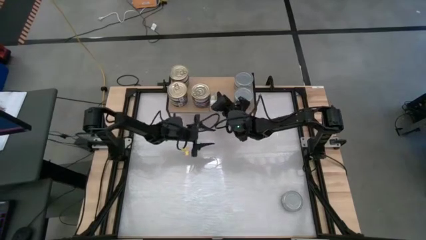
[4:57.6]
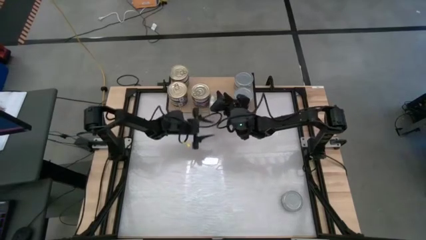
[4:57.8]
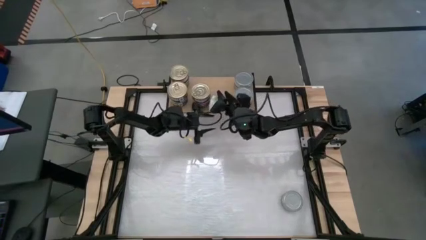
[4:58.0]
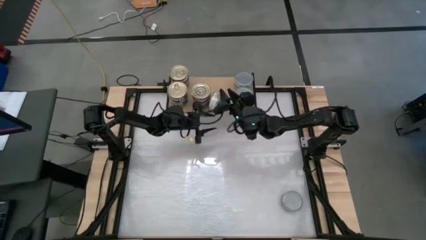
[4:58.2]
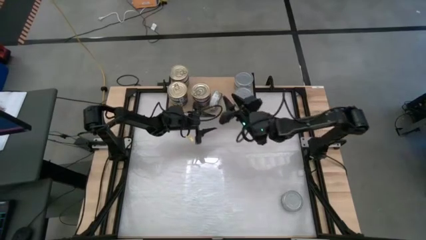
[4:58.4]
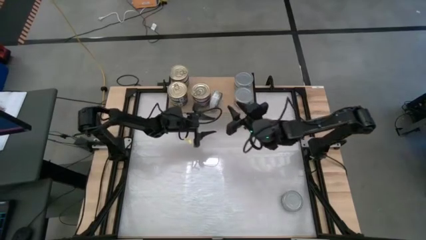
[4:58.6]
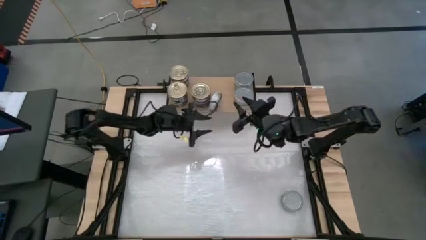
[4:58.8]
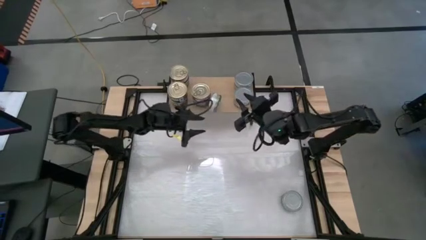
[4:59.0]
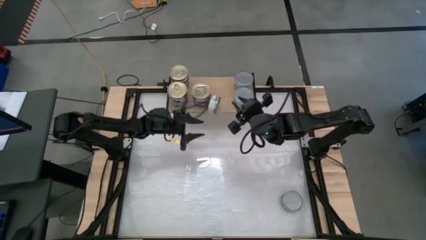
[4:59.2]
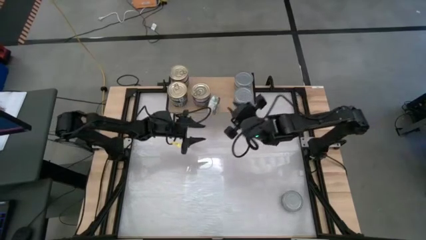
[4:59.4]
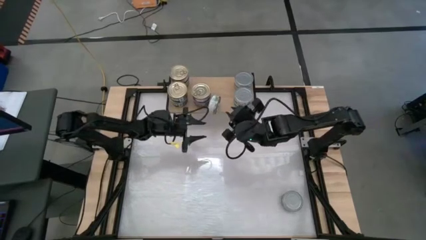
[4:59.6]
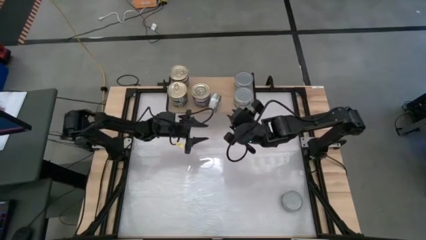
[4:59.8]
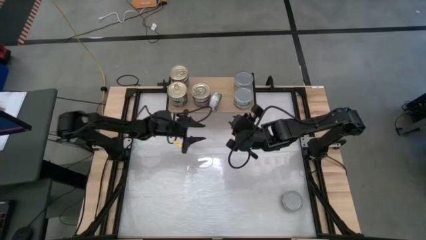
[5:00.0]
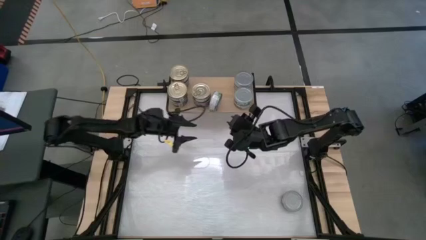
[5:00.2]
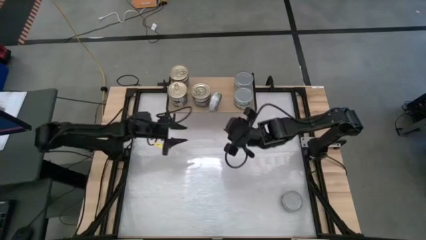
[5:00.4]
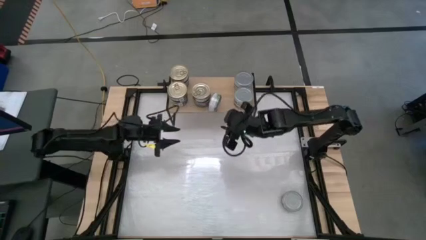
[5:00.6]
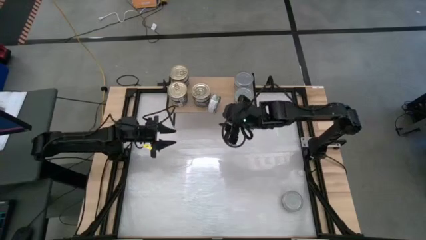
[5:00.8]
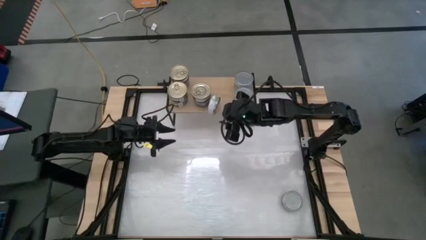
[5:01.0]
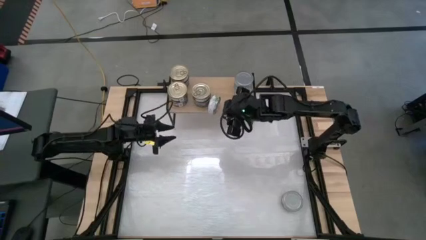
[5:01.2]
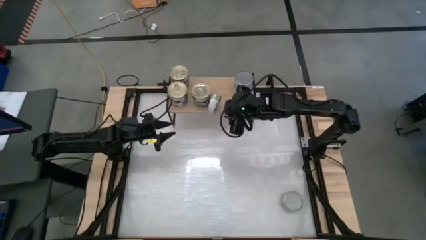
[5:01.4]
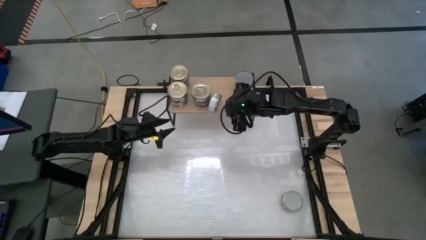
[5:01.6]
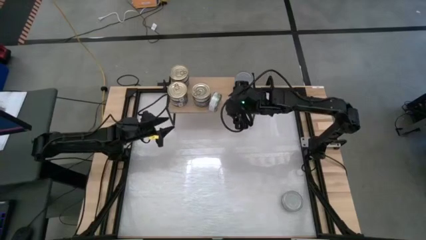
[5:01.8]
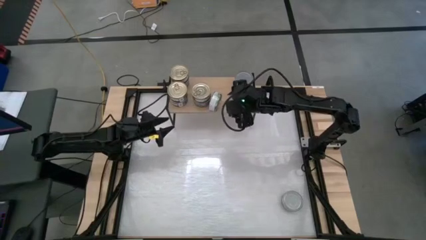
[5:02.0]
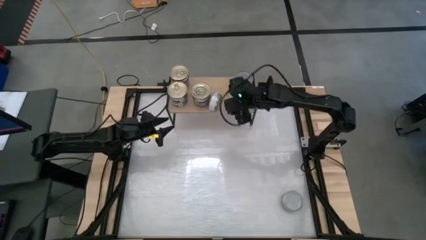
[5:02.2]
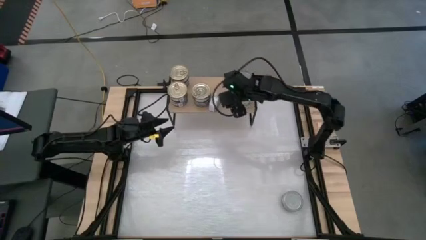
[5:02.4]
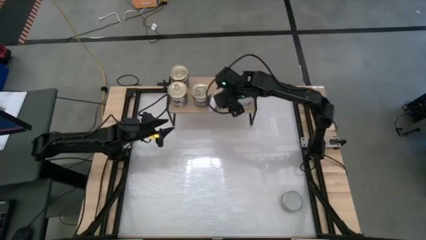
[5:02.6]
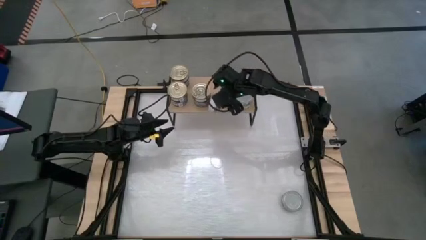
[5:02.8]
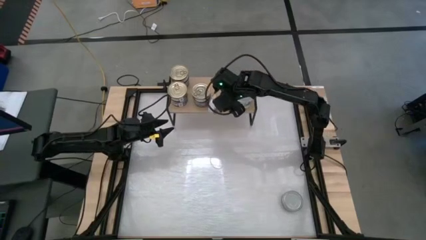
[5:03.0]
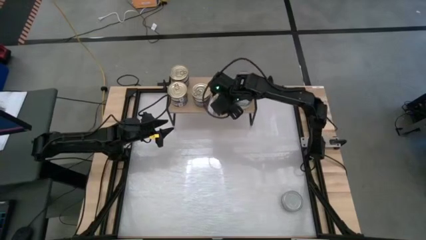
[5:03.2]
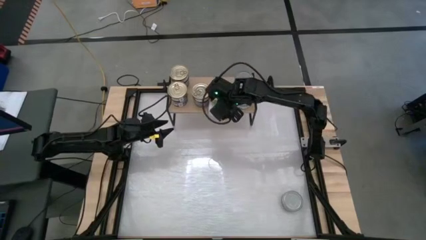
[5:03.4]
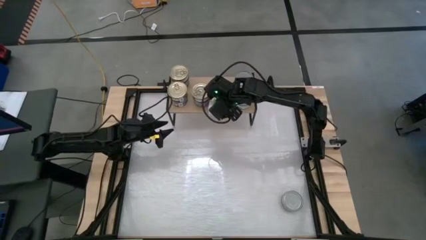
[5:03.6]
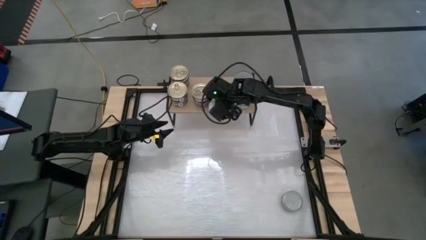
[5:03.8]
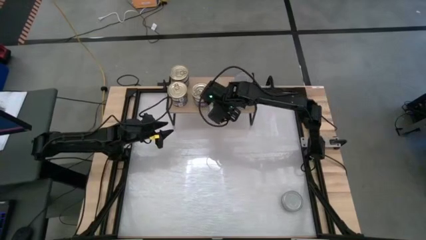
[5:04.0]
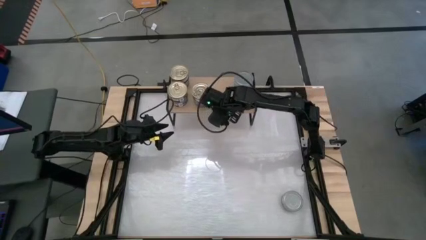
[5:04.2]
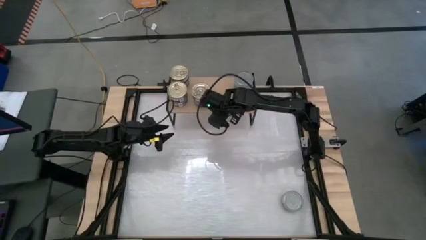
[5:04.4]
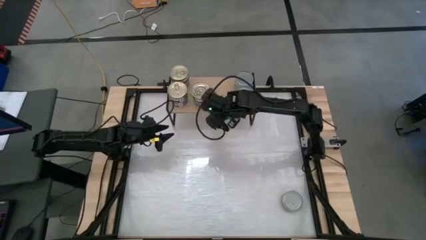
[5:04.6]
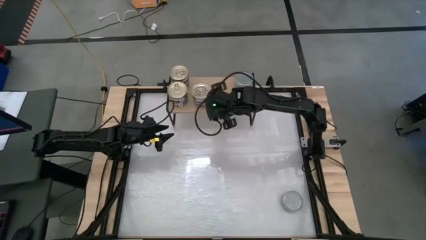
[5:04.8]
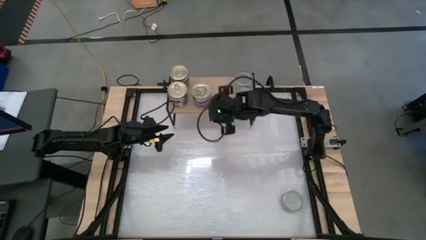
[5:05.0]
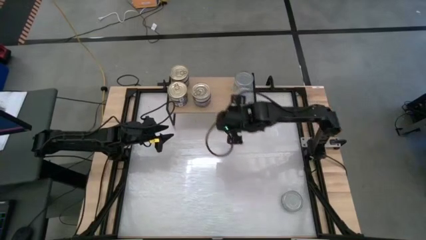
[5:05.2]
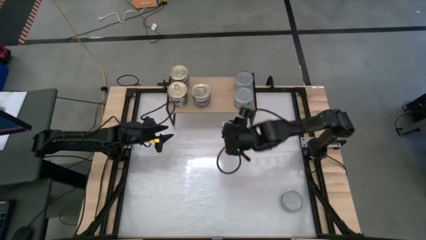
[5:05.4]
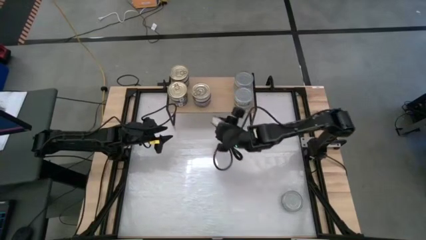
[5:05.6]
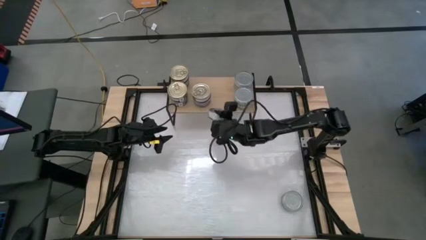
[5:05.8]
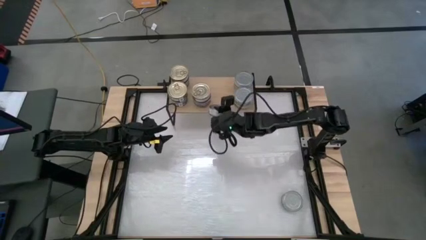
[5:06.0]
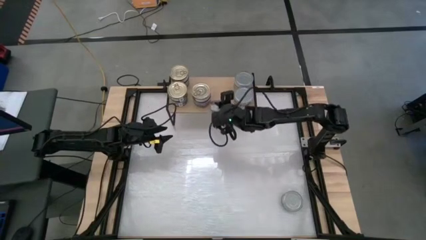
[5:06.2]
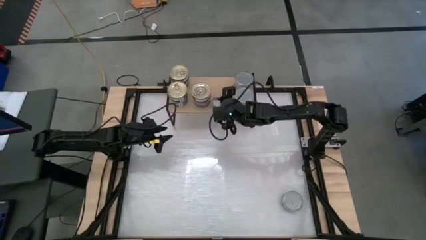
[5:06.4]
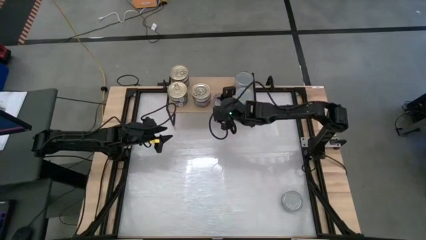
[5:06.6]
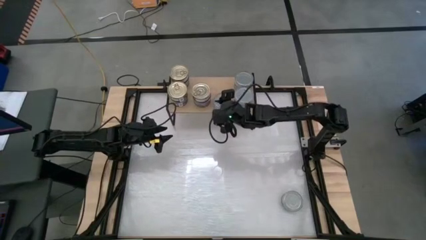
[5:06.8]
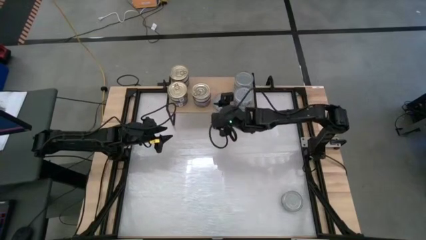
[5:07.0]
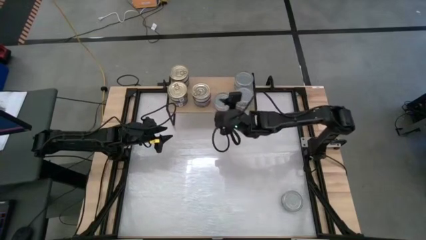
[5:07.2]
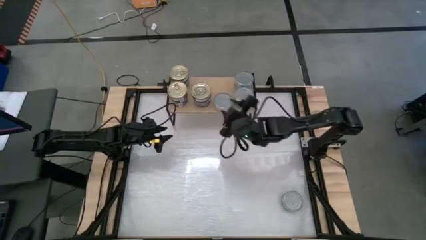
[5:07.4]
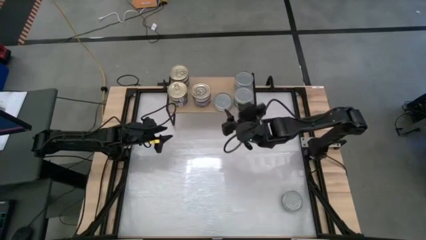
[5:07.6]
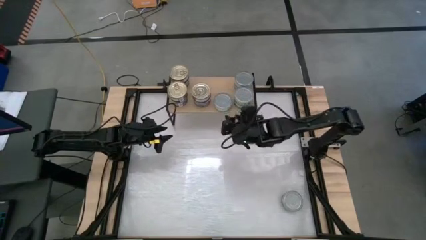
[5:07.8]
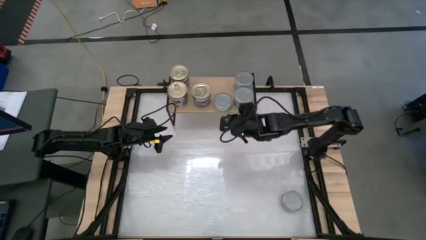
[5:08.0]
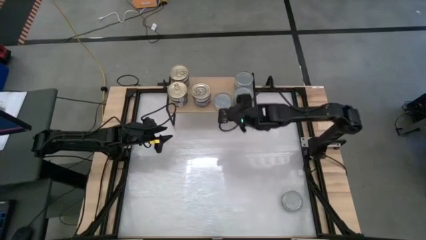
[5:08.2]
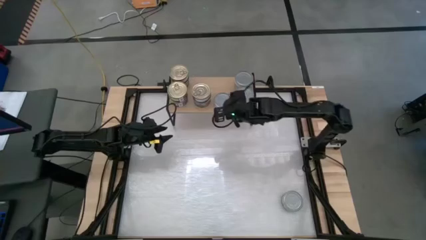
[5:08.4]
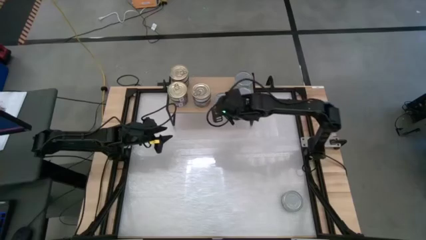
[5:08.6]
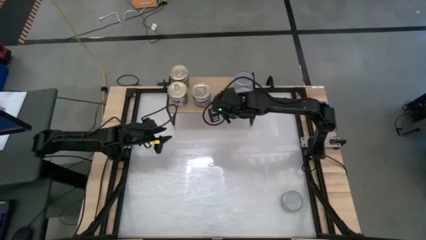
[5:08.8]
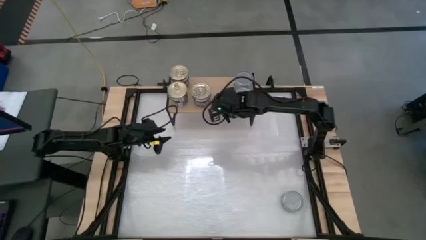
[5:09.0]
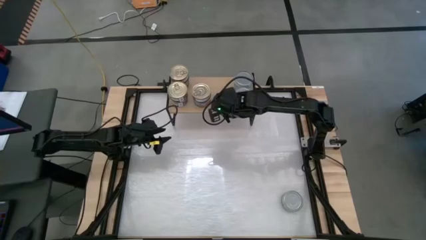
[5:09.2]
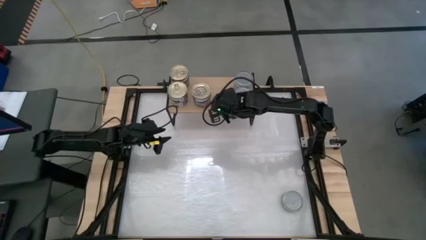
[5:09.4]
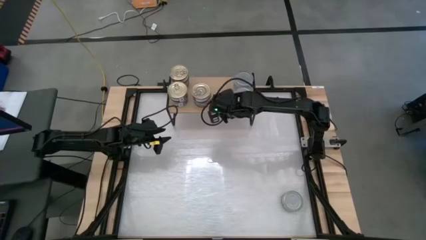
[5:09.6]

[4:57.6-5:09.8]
Task: Stack canned seafood by type on shelf
Put the green white tuna can on the shelf

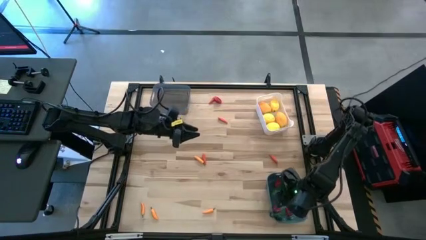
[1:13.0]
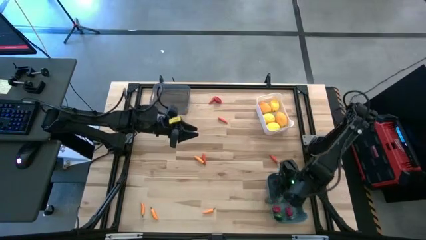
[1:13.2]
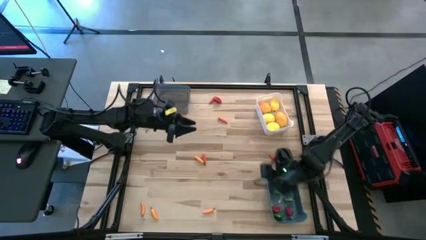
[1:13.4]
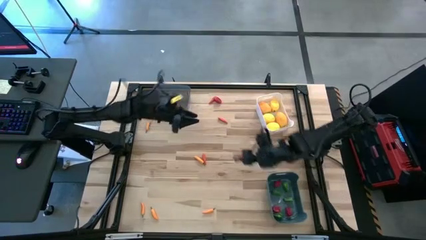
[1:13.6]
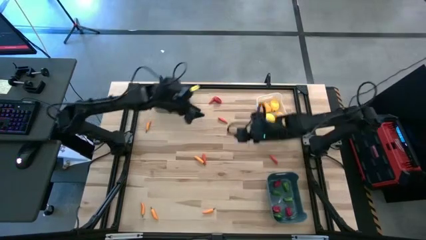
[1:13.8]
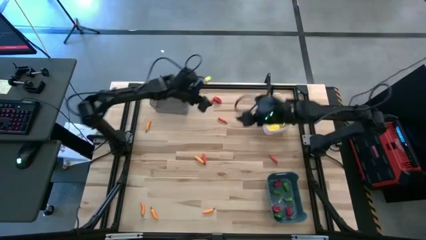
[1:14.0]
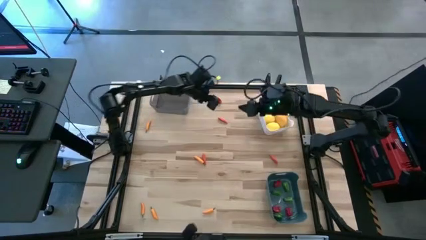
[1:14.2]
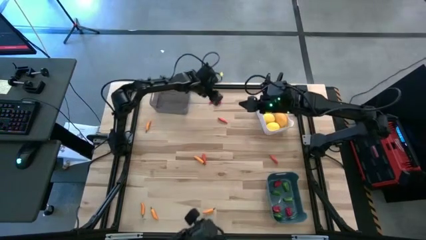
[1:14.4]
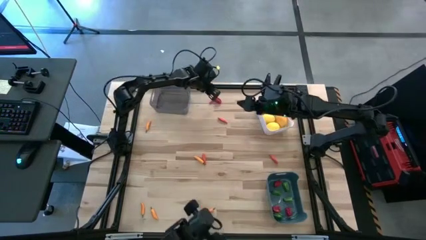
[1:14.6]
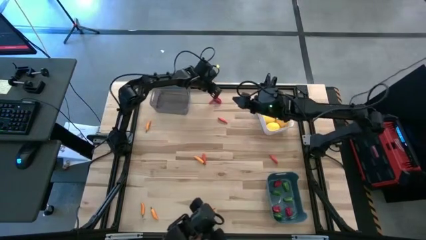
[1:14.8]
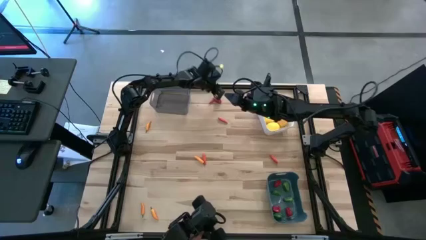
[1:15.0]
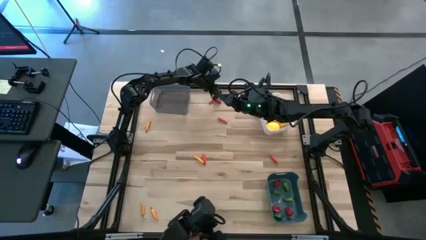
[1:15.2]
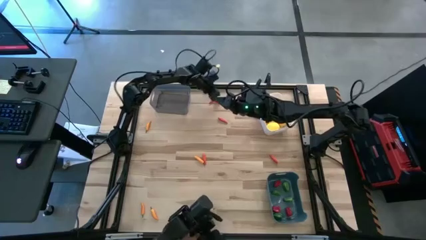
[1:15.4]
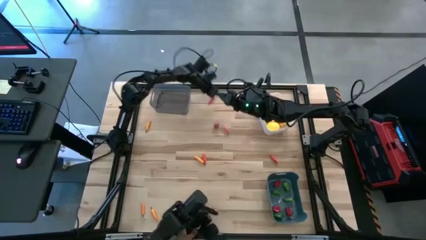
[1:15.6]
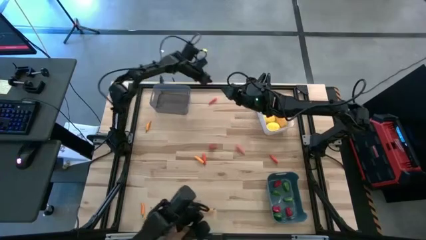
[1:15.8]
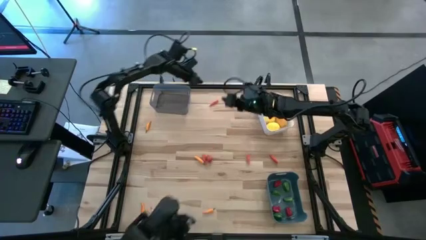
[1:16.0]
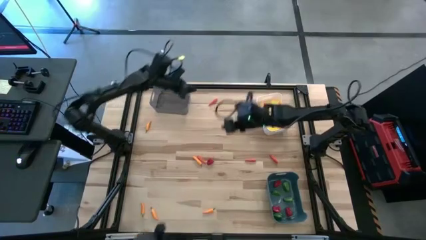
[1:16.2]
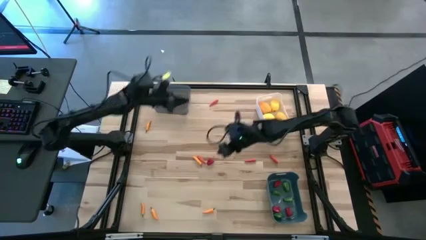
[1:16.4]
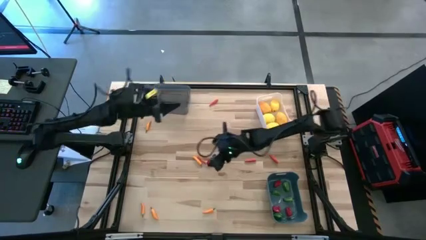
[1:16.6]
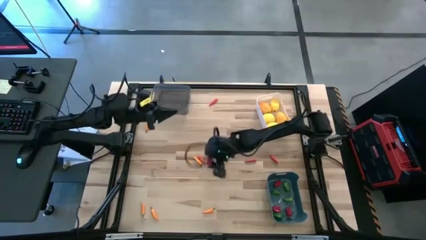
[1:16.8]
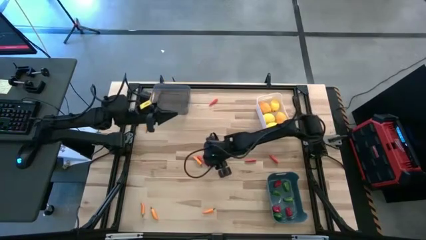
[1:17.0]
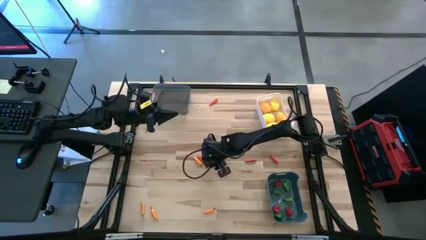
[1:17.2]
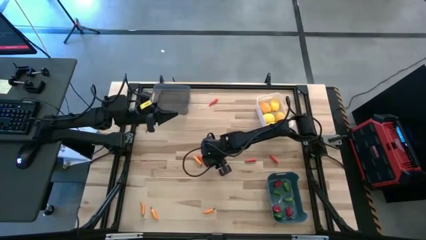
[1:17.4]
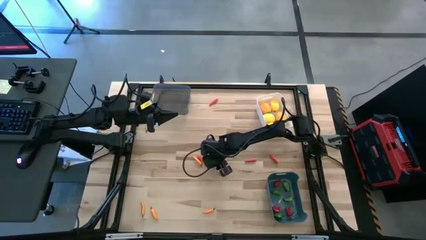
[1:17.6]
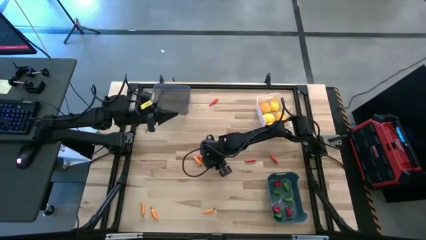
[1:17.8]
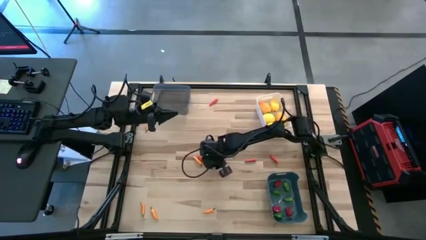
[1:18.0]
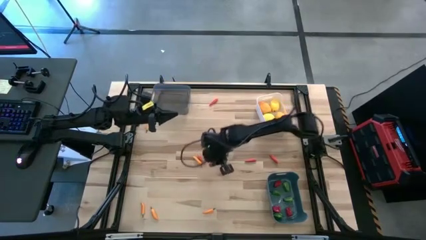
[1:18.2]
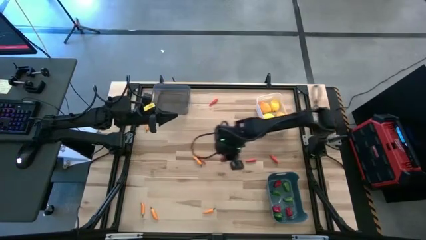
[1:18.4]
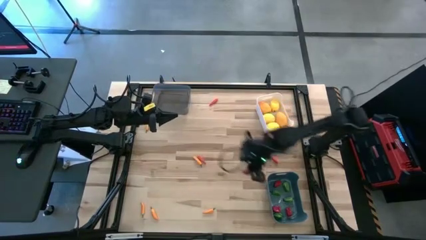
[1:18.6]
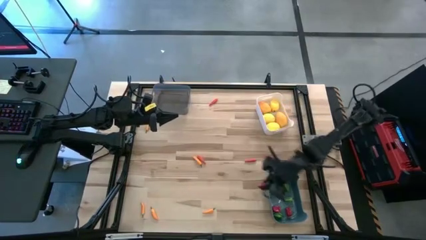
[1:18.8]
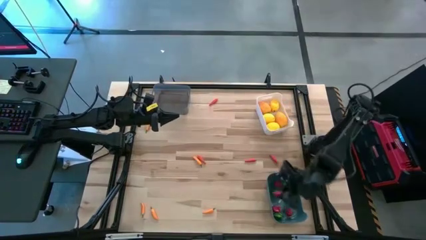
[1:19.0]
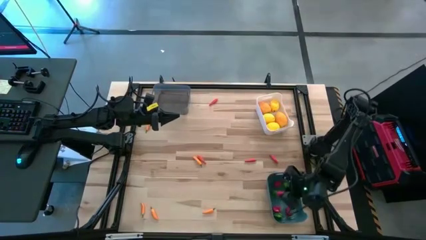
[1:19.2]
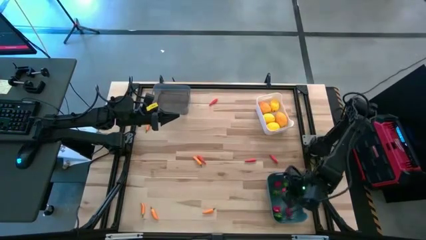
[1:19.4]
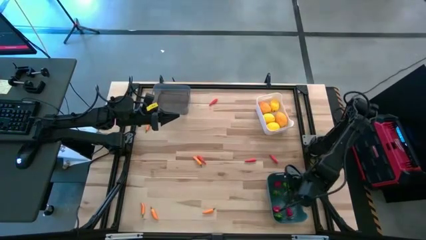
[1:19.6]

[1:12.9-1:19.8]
Task: Sort produce into baskets
Put the red chili pepper into the blue bin
